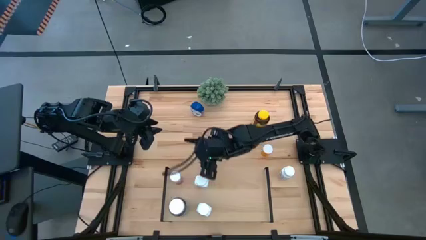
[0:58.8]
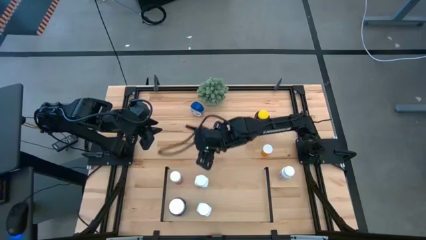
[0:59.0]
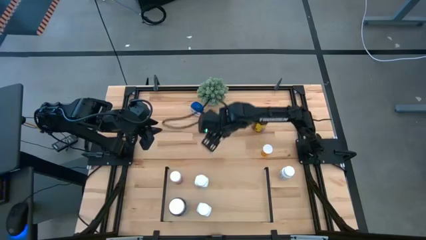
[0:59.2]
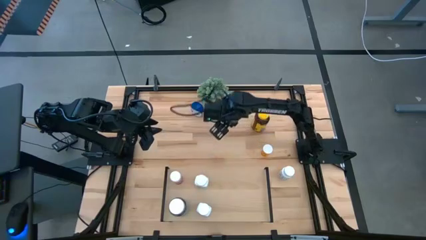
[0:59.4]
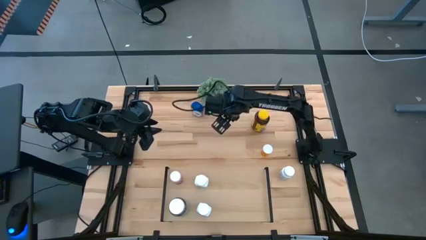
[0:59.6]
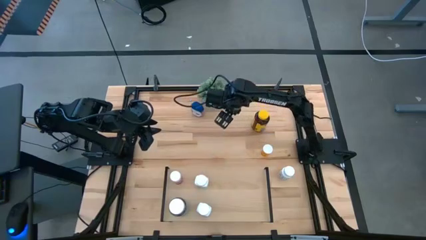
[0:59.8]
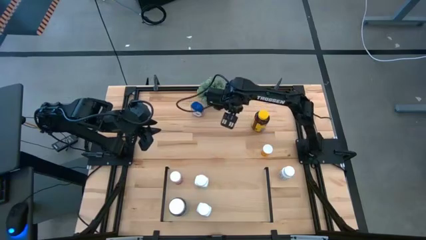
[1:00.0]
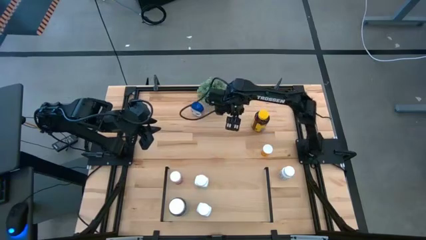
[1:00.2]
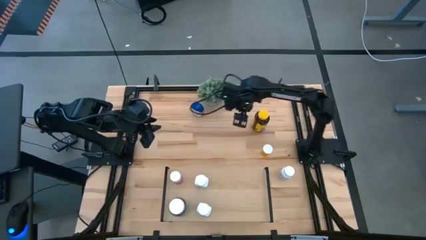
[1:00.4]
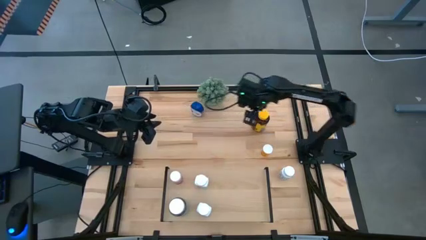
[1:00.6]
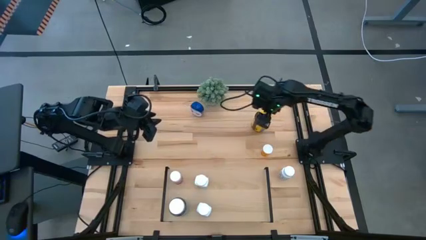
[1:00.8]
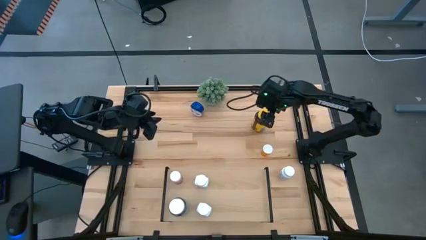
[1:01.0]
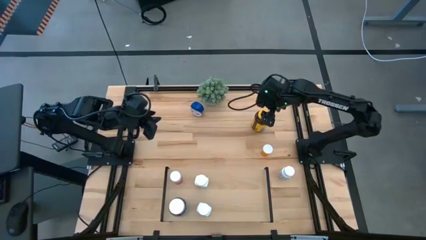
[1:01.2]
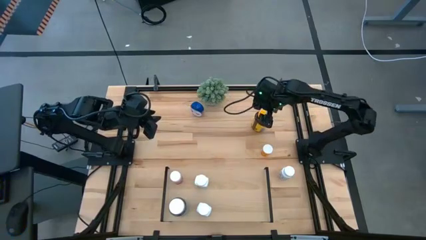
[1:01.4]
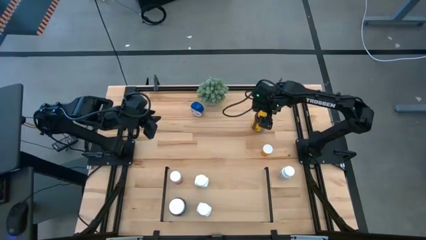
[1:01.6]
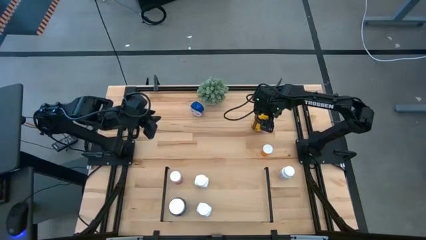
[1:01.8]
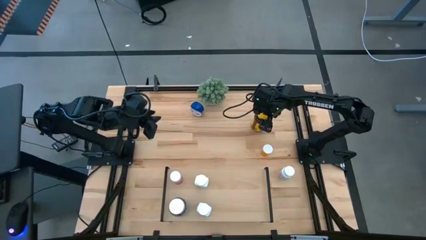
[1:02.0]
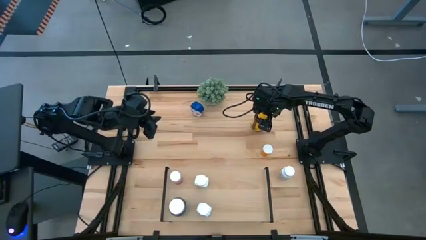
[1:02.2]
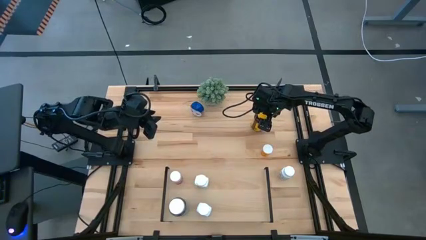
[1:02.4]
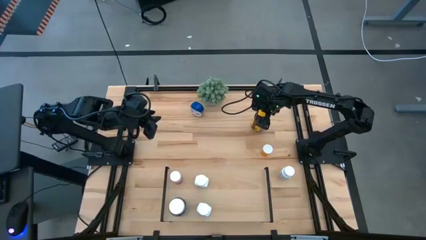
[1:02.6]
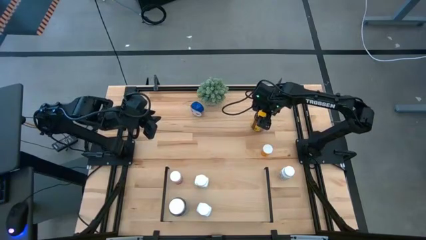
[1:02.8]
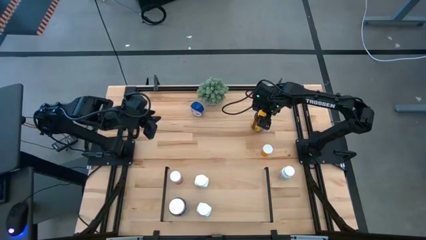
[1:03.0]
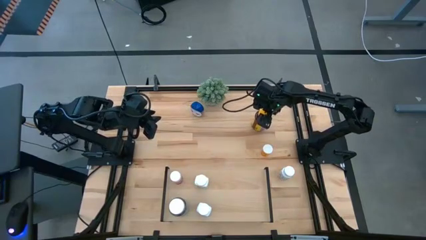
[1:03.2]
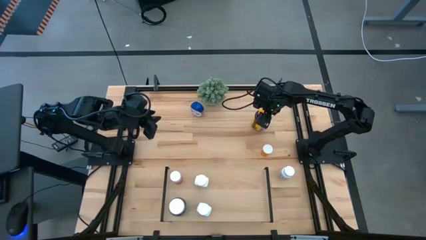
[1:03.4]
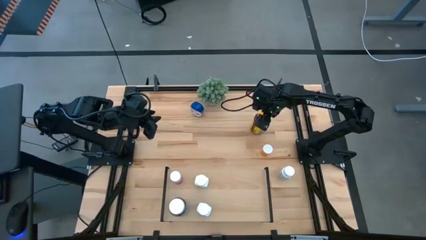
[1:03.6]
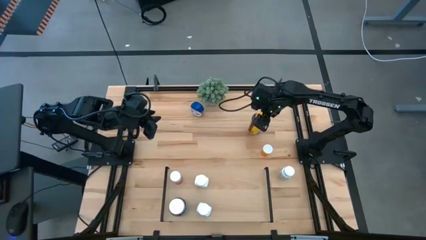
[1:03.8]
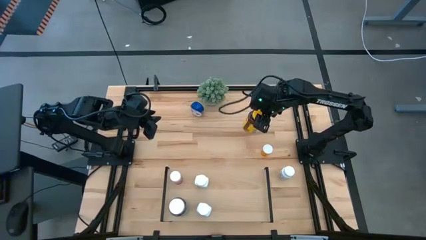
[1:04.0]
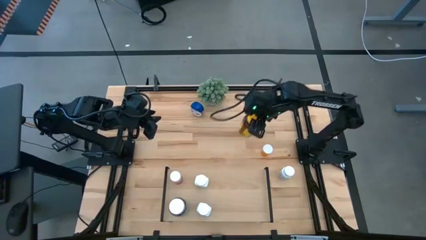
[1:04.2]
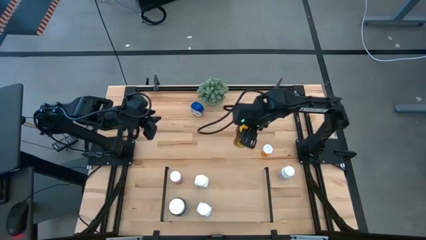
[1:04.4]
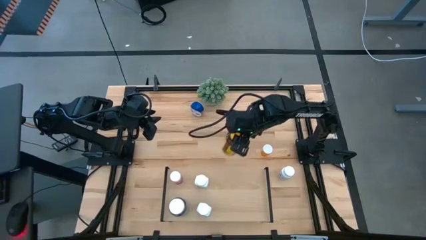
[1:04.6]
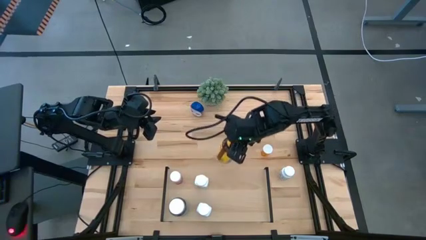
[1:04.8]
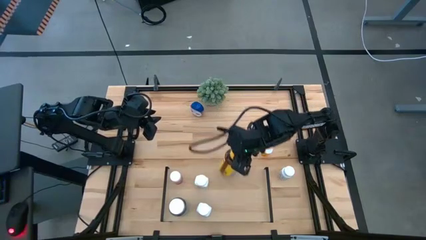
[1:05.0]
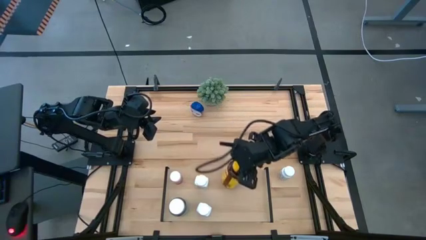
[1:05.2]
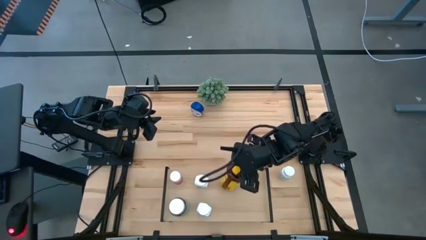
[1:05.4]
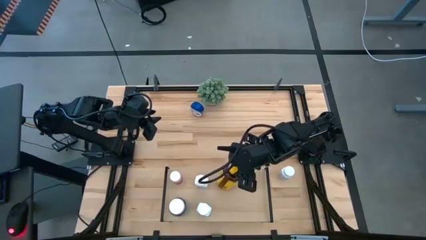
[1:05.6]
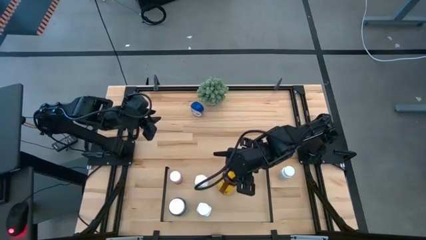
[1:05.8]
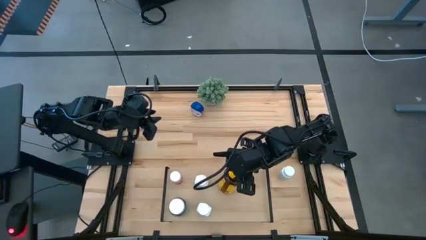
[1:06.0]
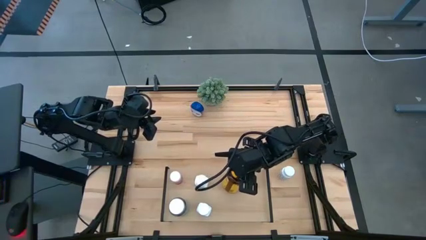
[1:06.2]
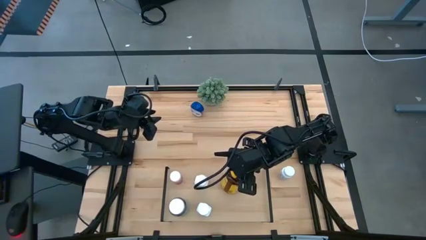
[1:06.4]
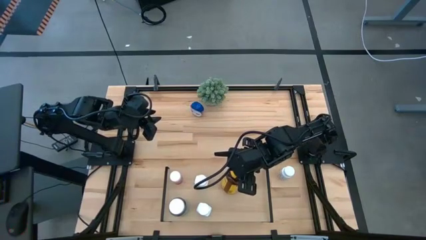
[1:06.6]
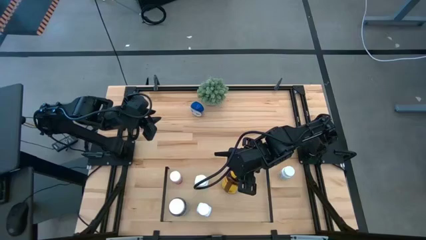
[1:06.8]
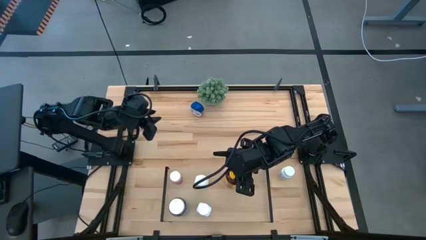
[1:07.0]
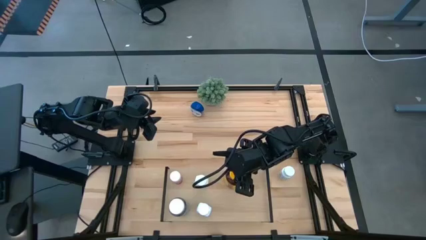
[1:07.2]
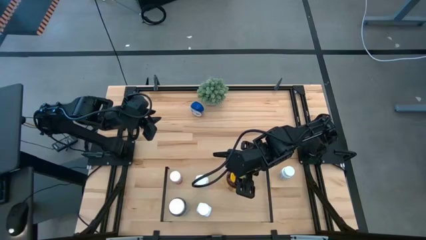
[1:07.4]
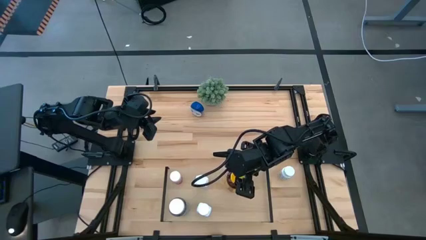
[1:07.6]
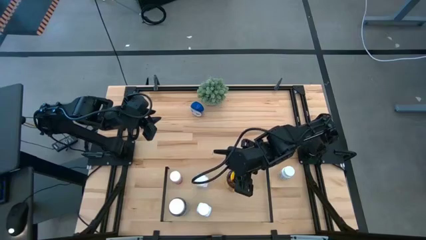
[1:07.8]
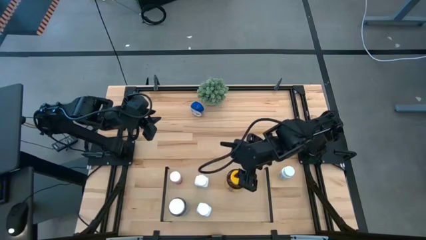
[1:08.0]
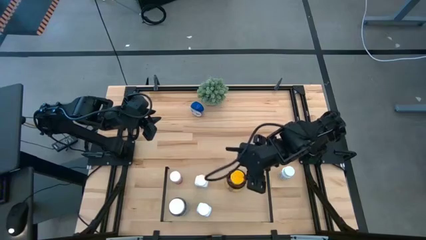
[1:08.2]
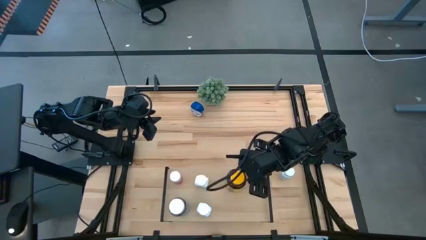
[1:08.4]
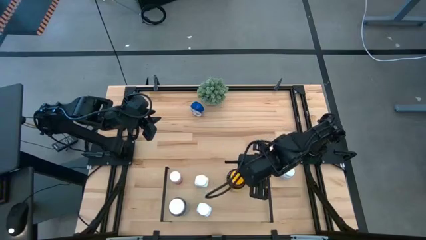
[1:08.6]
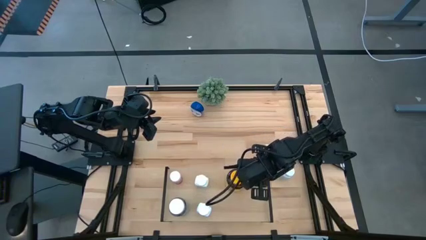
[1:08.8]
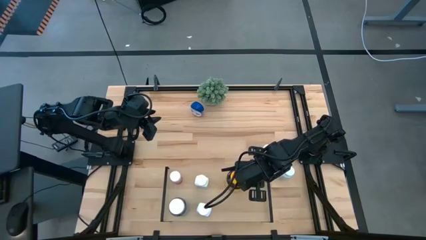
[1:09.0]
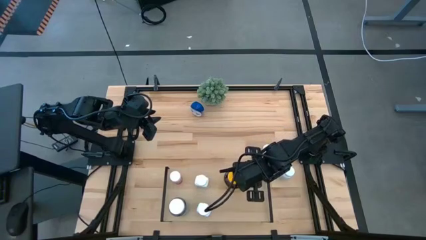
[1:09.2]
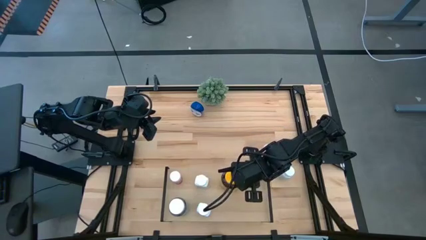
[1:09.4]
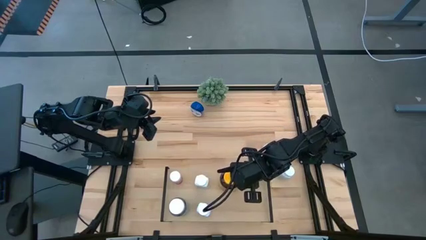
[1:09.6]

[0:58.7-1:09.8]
Task: Pick and place medicine bottles onto shelf by color
Put the yellow pill bottle on the shelf
